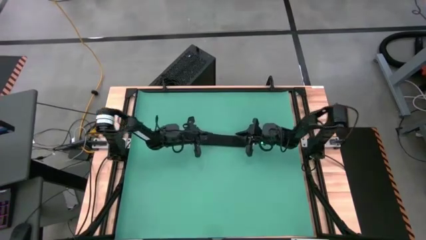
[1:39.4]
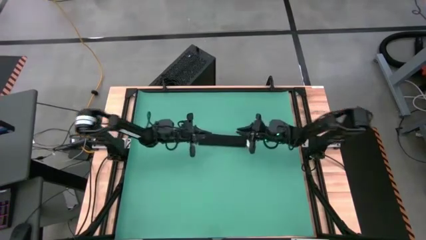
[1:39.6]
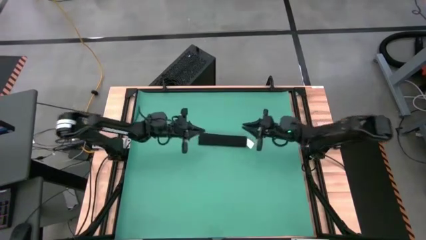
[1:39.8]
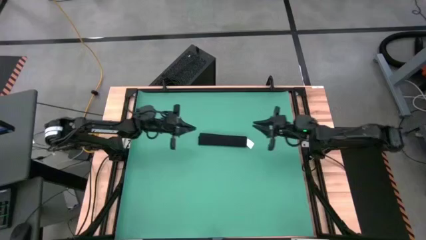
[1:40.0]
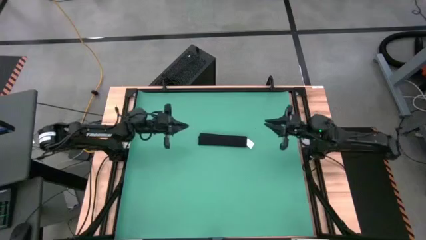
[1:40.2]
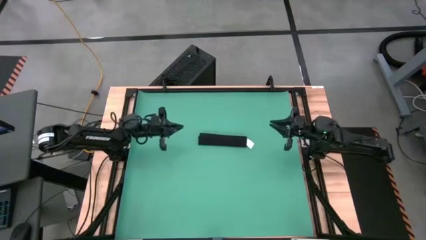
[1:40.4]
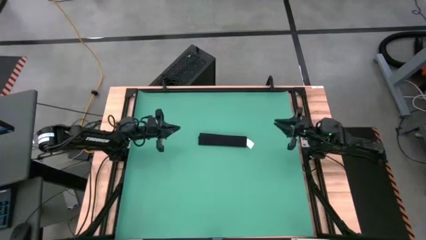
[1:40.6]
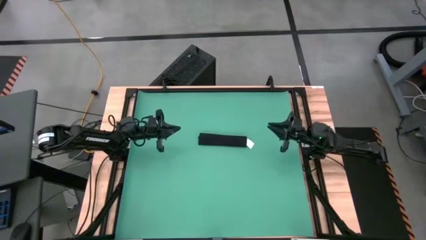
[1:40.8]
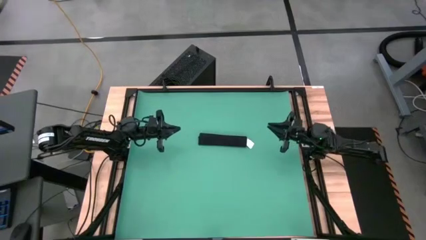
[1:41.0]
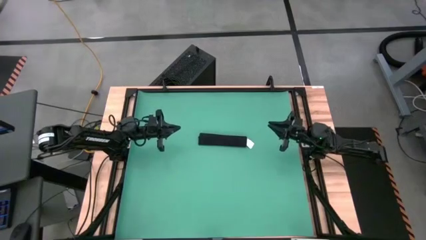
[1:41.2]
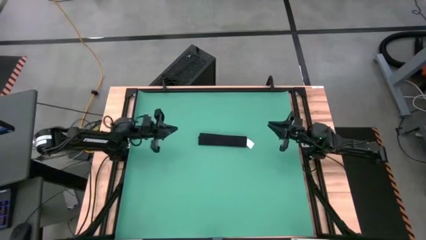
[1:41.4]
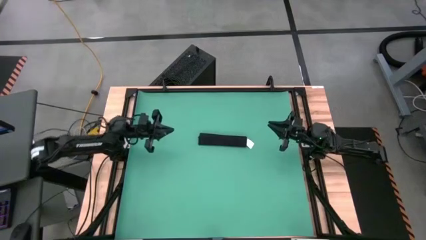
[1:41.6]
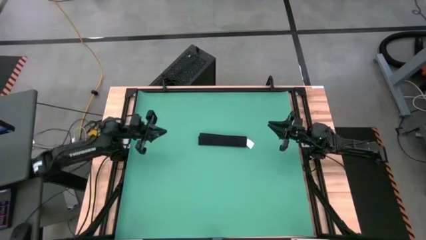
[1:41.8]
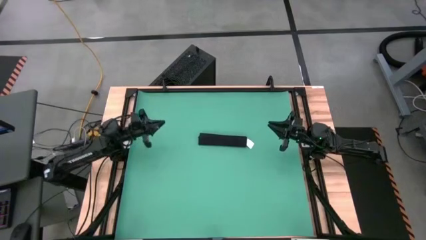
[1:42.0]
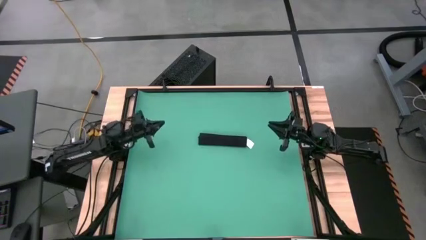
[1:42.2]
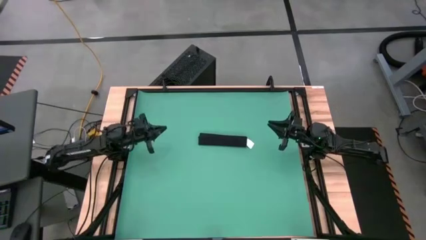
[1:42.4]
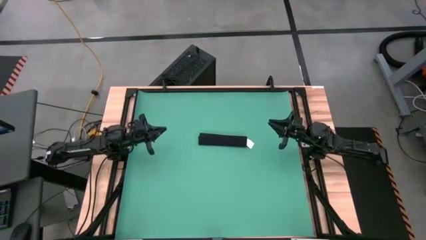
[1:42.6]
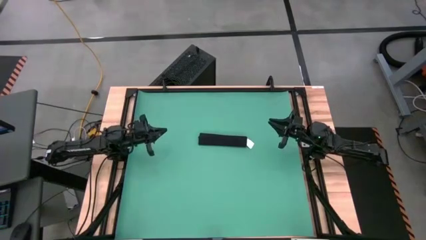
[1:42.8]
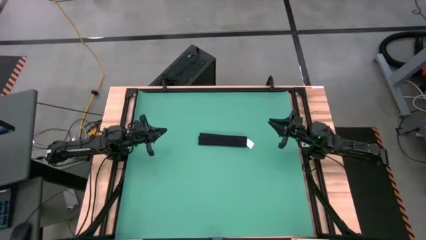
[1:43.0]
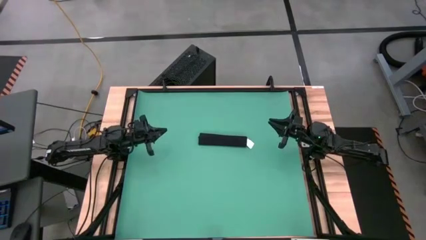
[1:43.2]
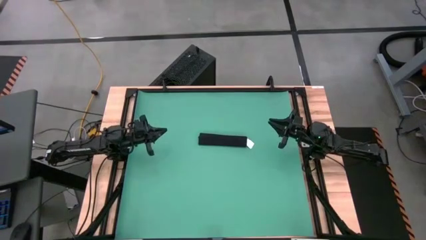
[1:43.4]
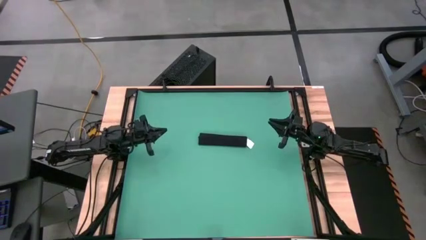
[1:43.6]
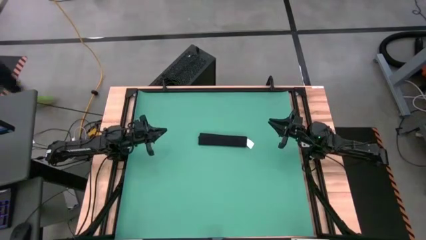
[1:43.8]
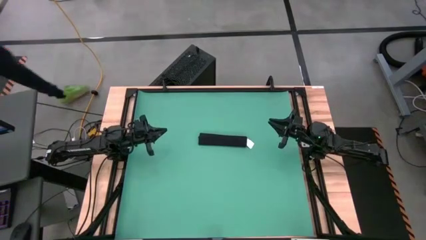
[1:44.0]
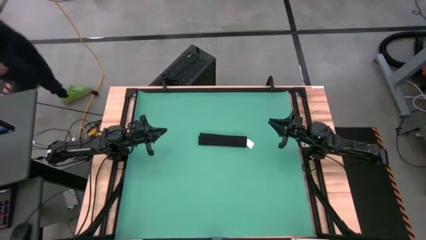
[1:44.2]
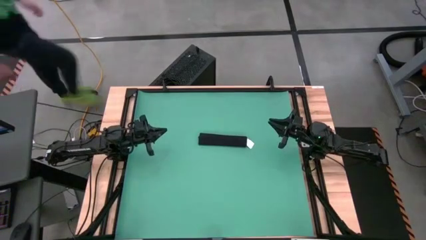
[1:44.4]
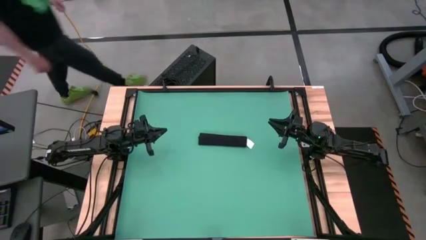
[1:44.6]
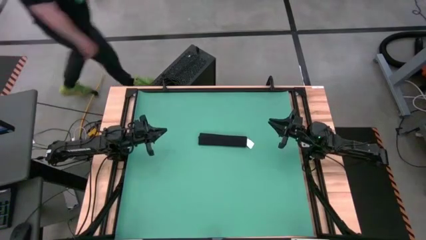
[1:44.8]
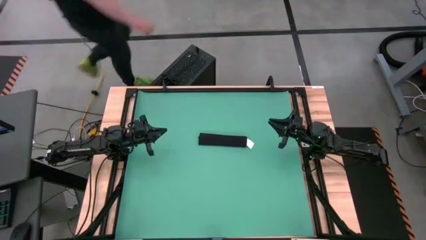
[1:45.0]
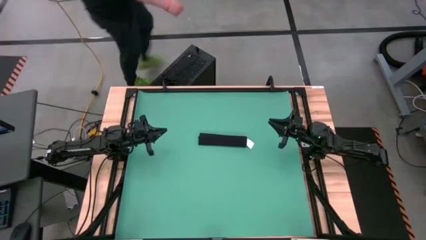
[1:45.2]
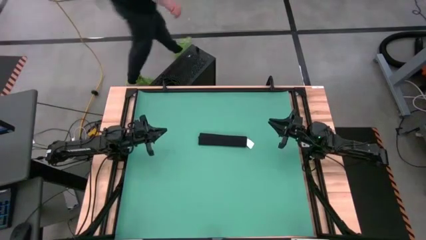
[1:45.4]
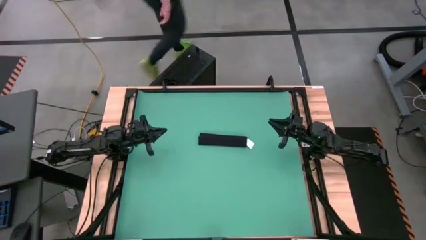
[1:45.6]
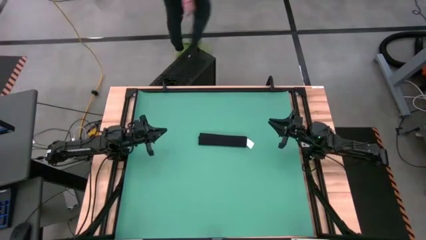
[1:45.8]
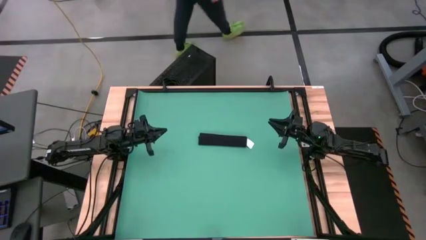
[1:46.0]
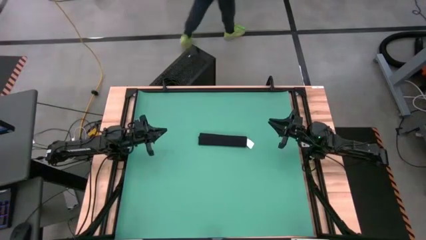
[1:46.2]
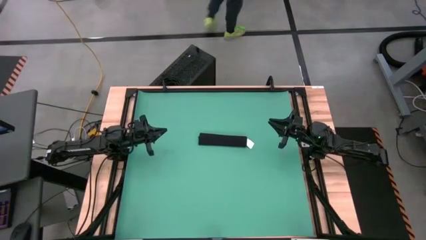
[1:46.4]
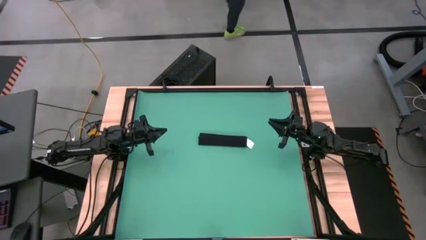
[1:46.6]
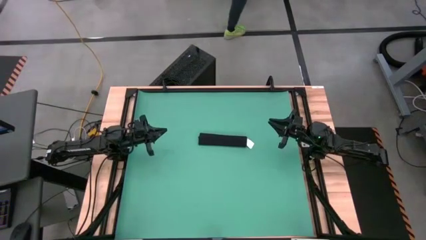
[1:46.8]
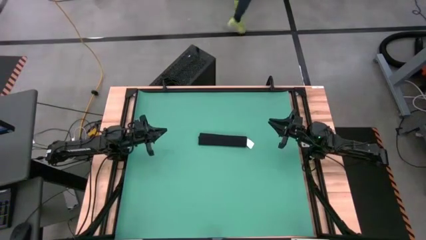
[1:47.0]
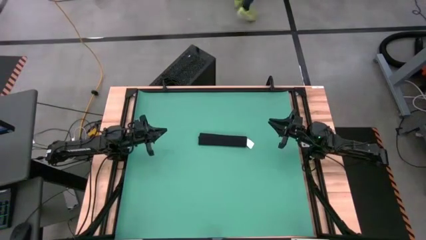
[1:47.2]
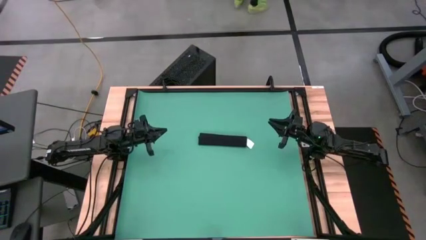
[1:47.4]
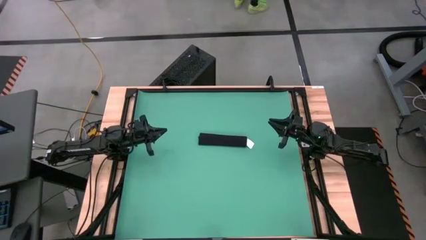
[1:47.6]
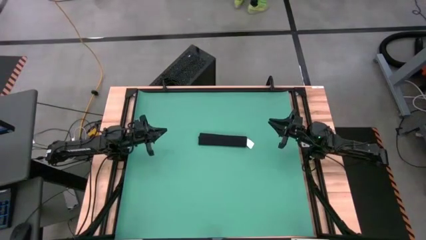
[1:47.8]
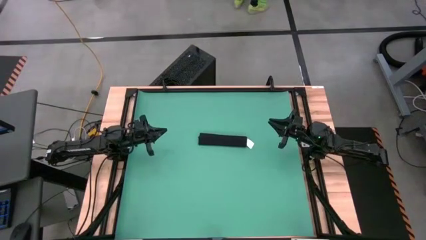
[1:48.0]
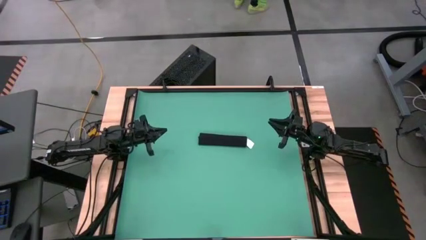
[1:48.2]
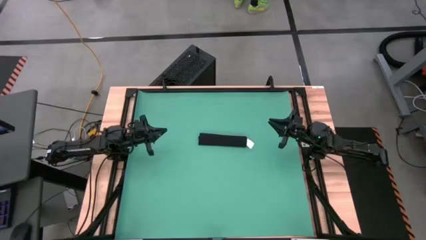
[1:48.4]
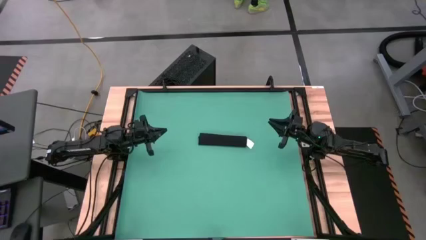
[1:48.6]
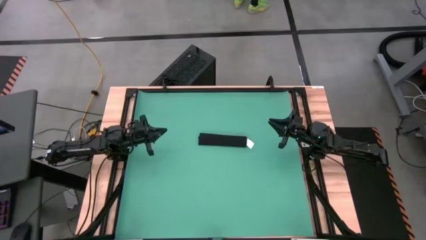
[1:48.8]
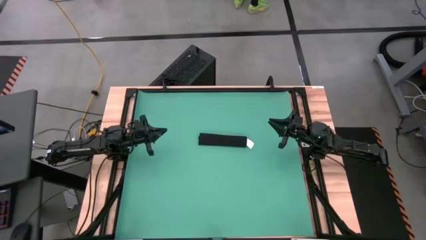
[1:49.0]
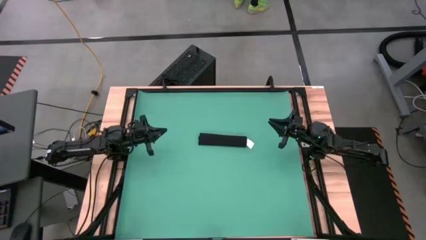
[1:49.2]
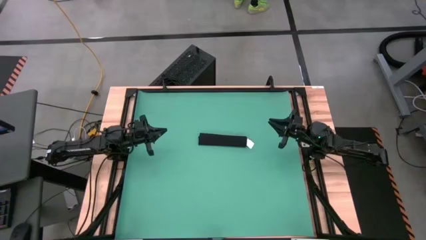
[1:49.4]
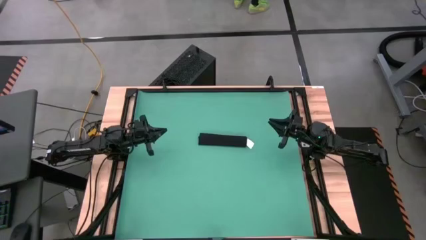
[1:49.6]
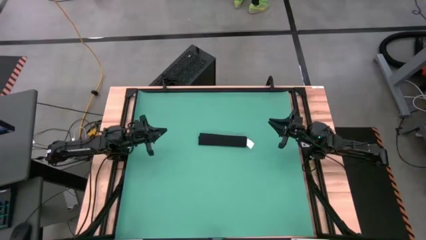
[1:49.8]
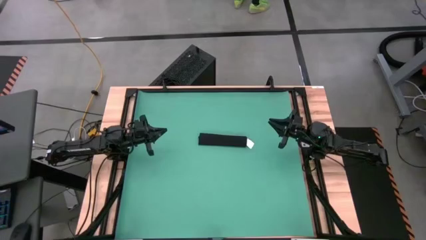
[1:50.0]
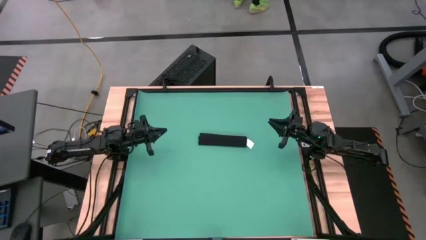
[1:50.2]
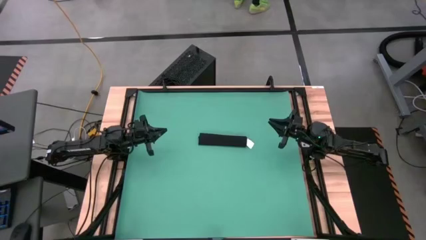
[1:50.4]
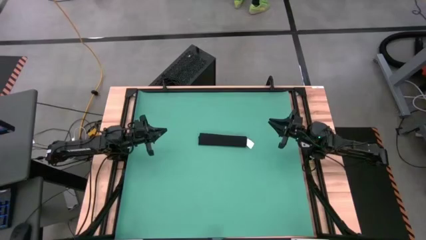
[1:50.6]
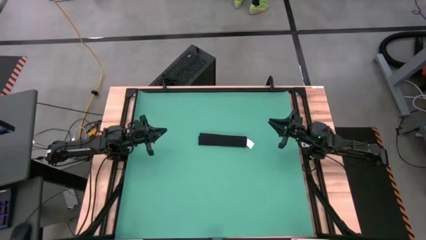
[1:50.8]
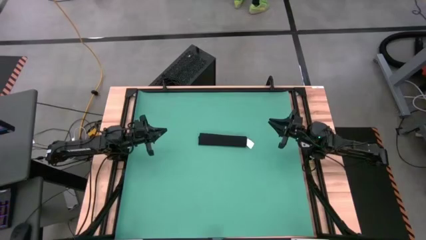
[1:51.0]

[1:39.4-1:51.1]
Task: Roll towel
Return to Home Position

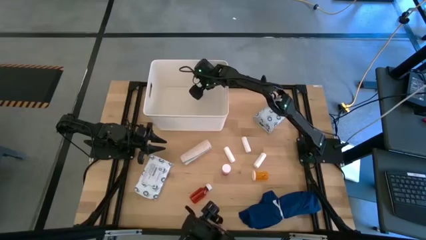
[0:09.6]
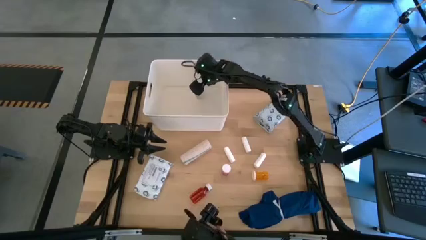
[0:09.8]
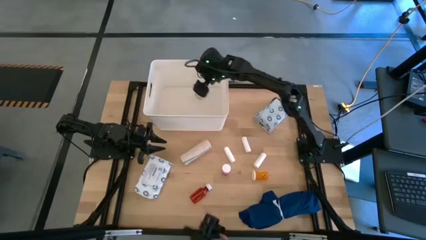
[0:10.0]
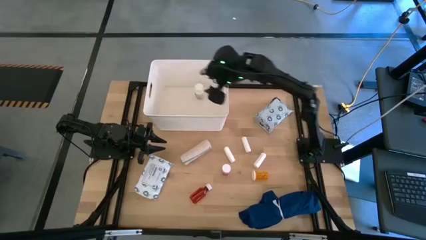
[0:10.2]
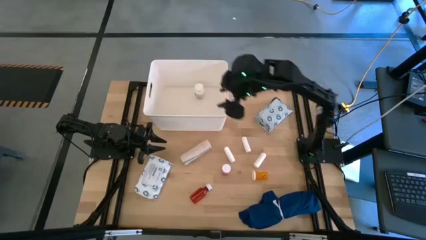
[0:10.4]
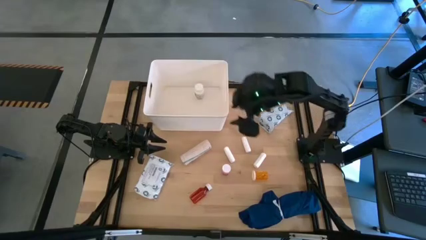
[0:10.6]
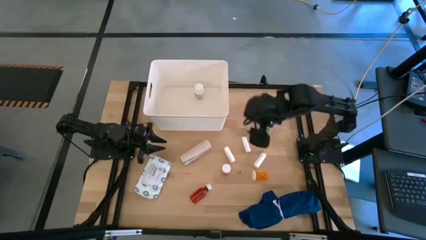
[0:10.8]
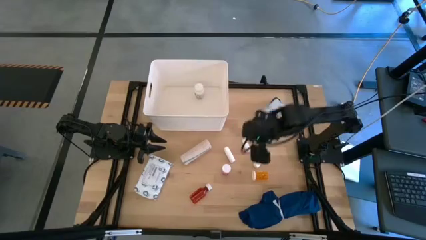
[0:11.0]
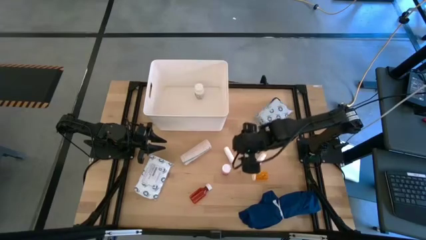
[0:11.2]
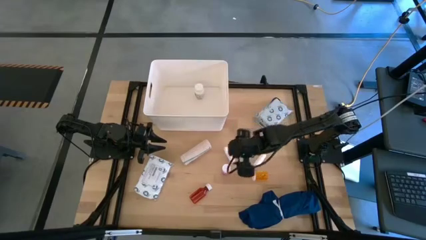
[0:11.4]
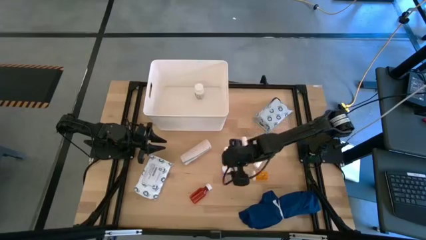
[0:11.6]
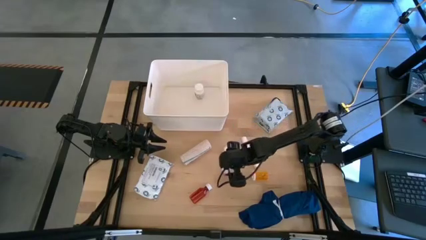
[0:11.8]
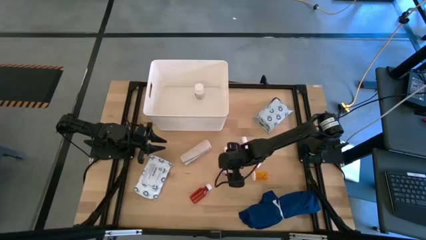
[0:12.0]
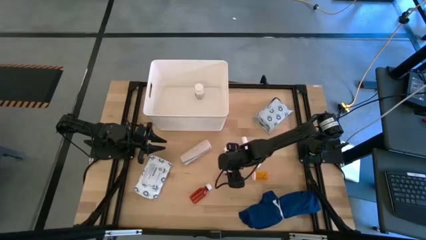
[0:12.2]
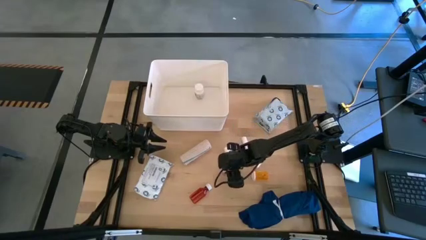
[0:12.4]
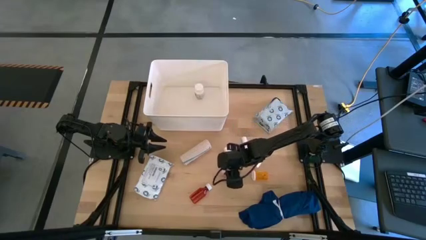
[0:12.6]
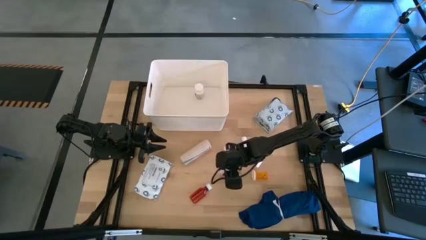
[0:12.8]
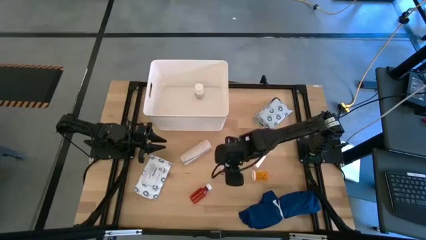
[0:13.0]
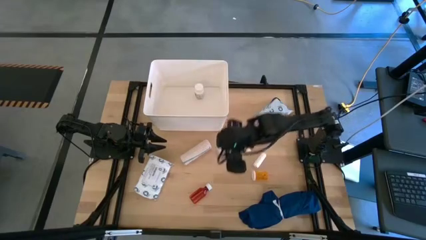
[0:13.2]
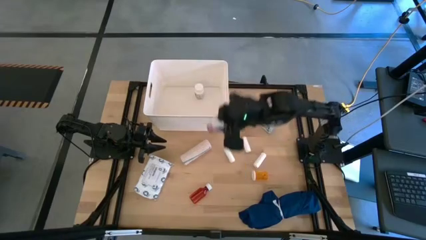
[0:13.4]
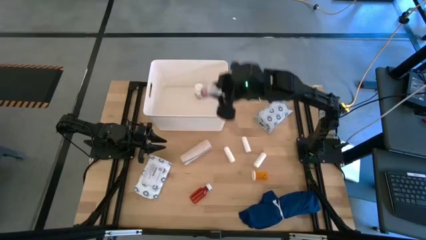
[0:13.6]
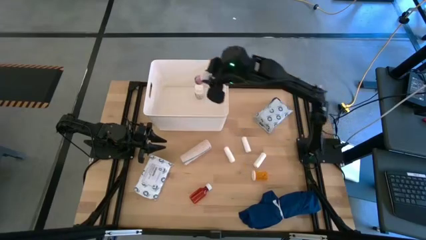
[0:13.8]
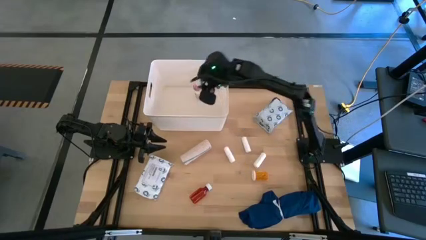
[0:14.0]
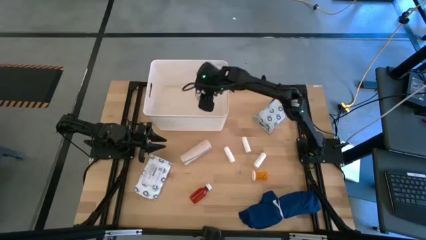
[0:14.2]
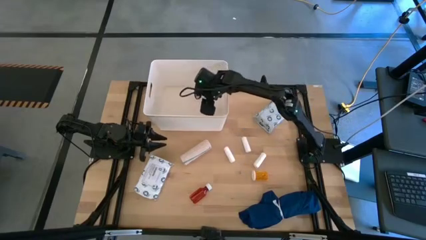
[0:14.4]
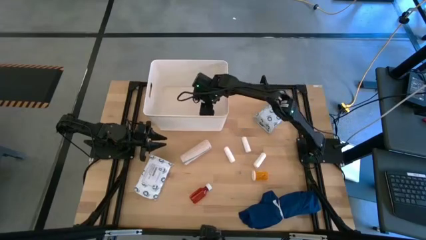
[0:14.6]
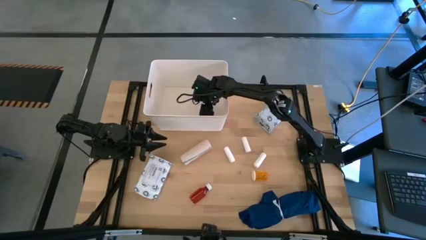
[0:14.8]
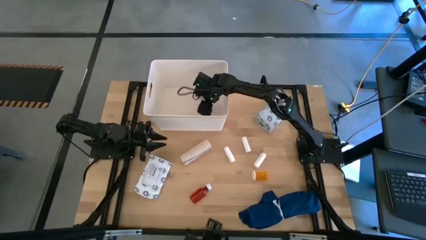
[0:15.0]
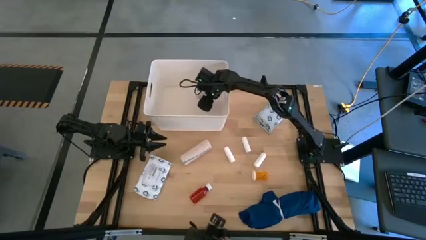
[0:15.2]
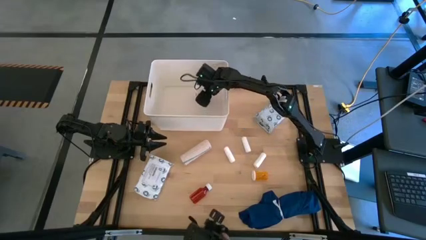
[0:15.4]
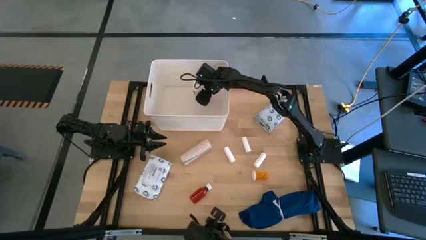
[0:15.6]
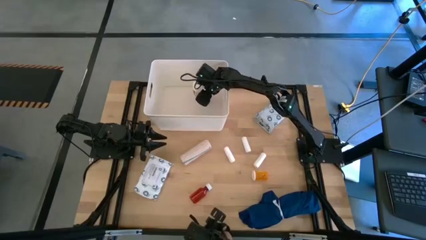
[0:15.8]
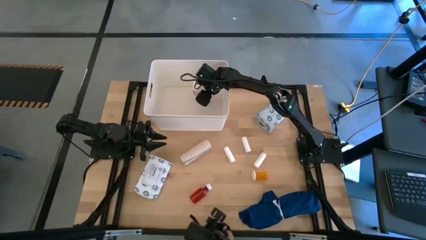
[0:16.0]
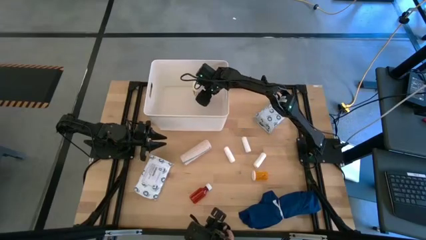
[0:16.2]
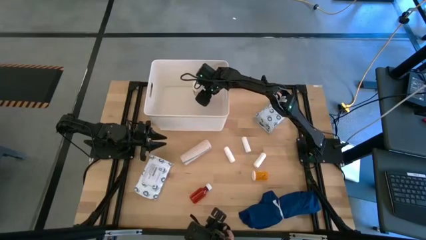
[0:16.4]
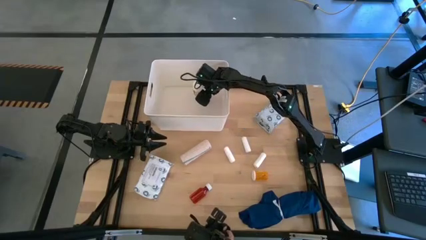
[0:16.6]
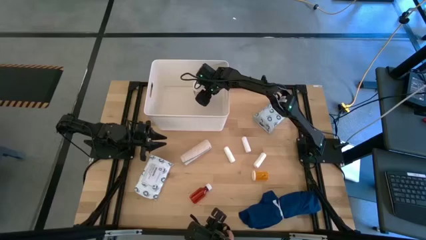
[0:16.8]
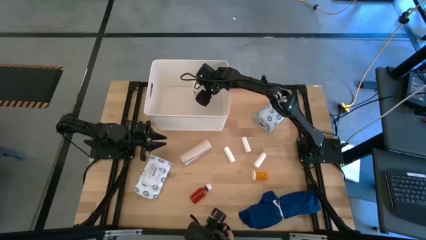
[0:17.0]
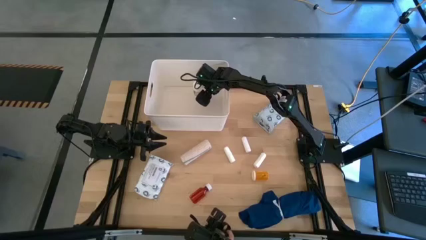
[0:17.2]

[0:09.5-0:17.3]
Task: Pick & place medical supplies in basket/bin
Put the pink medicine bottle into the white bin
